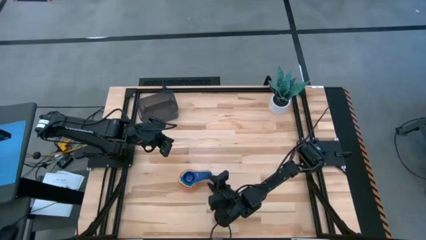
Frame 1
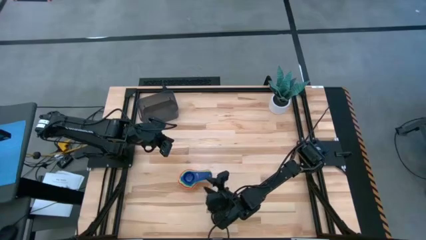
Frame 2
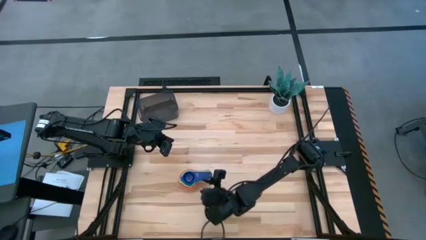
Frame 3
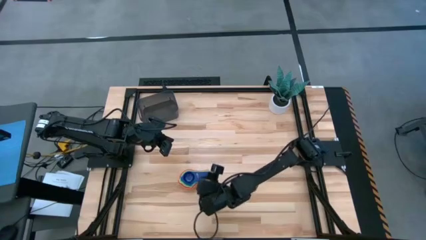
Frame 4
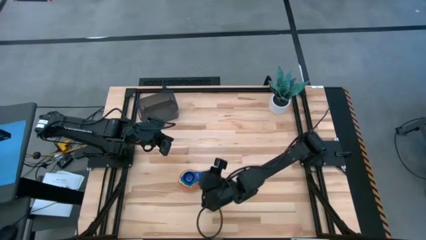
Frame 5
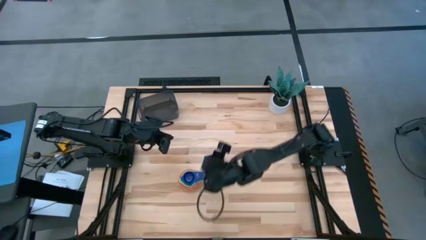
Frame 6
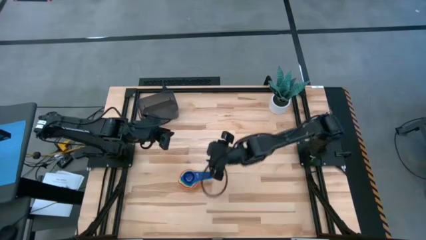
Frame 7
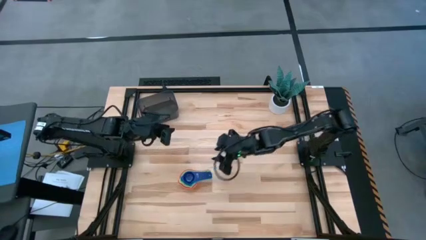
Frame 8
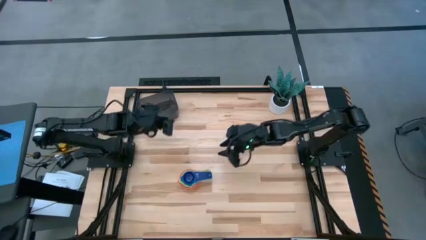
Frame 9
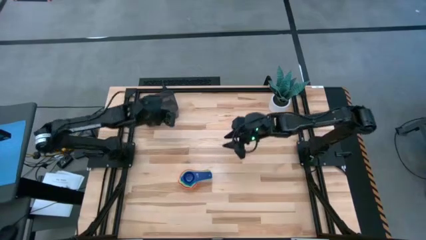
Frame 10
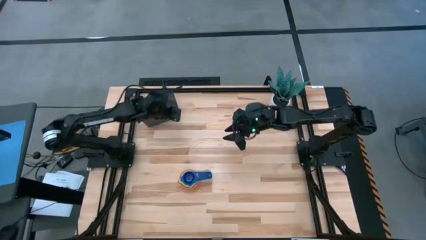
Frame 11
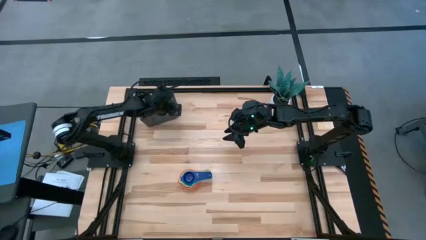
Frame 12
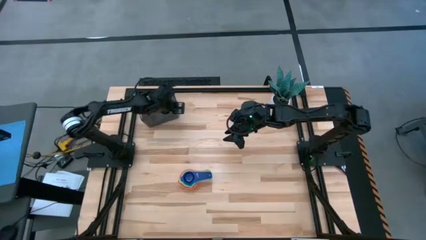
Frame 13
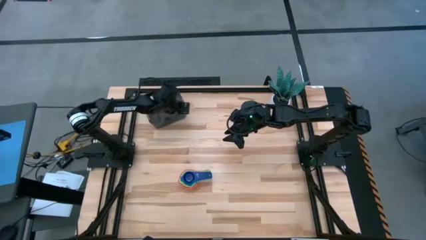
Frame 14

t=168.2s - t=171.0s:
Task: Nest measuring cups in basket
Adjust the black transparent bin on the table

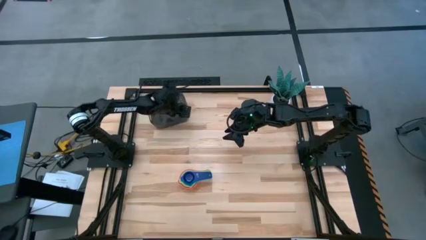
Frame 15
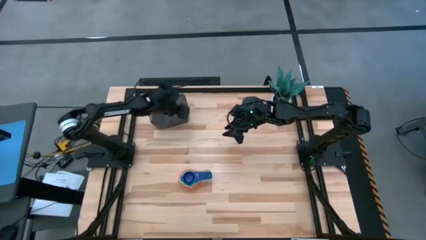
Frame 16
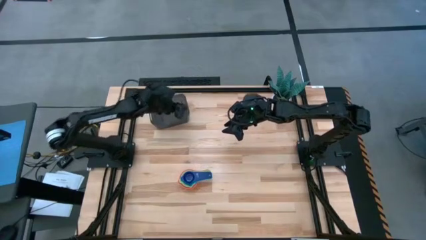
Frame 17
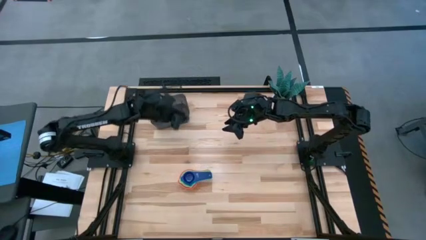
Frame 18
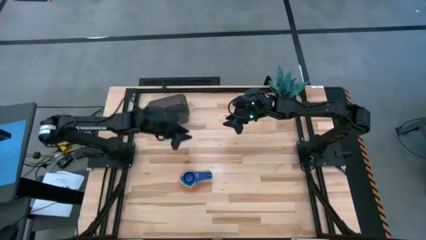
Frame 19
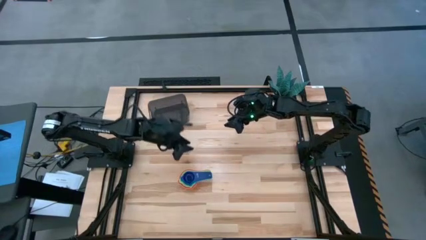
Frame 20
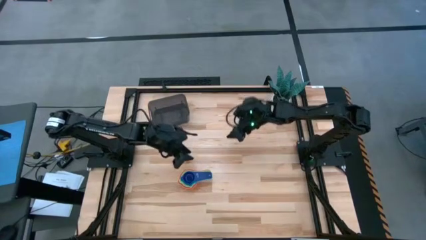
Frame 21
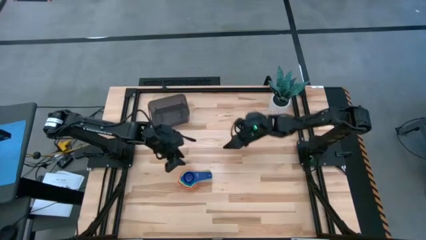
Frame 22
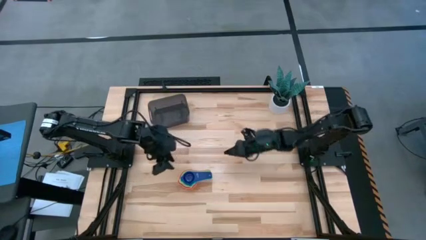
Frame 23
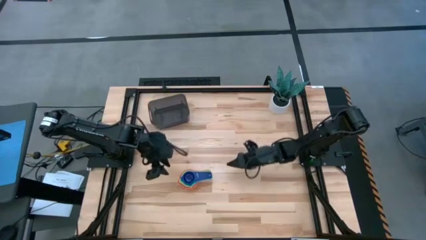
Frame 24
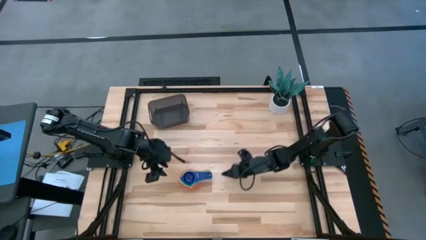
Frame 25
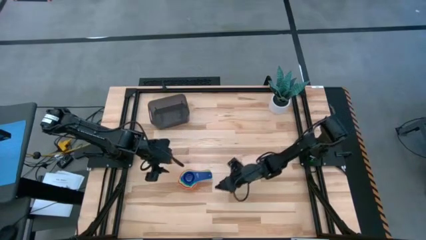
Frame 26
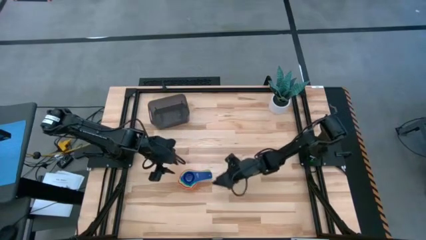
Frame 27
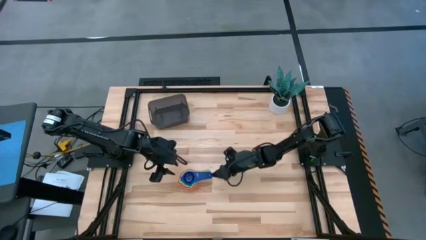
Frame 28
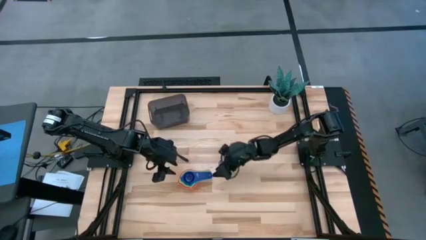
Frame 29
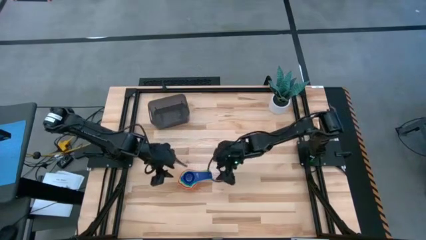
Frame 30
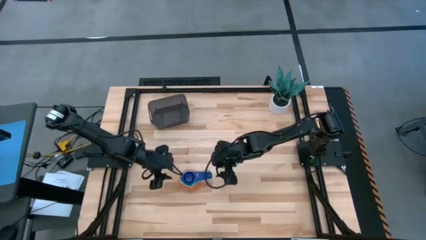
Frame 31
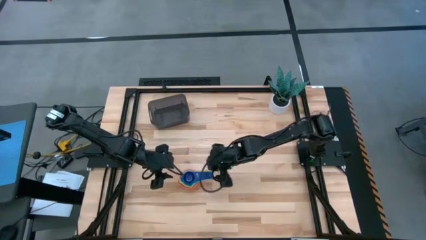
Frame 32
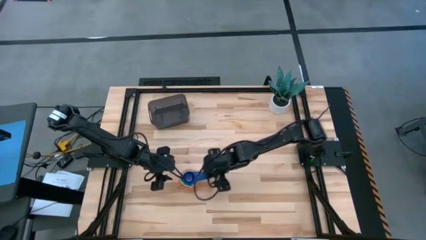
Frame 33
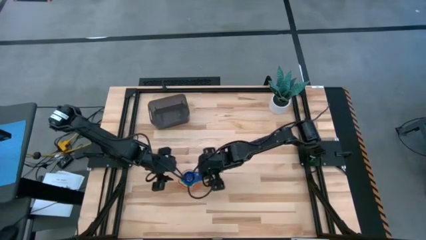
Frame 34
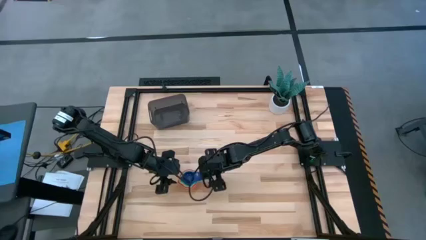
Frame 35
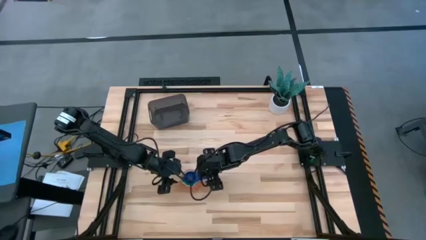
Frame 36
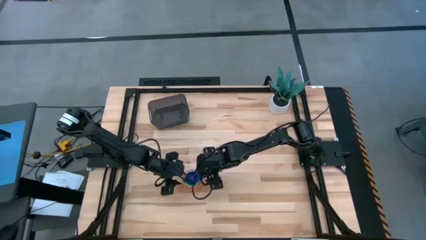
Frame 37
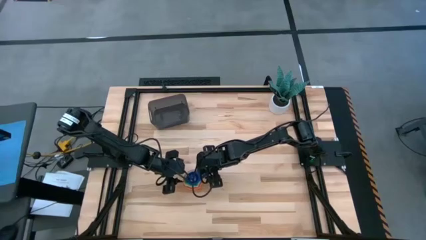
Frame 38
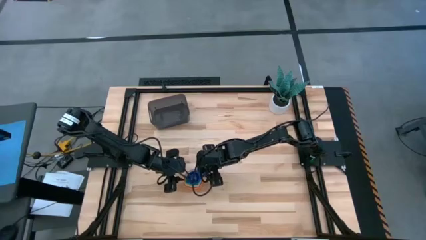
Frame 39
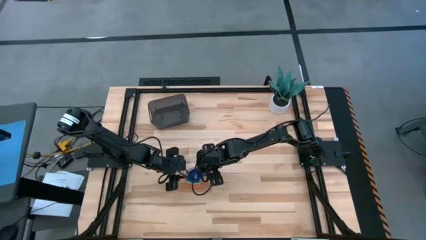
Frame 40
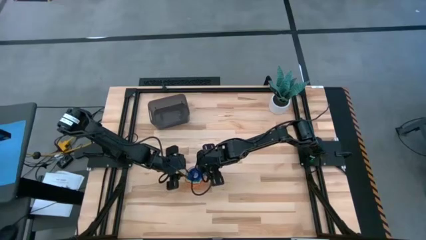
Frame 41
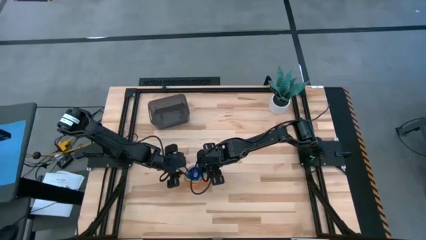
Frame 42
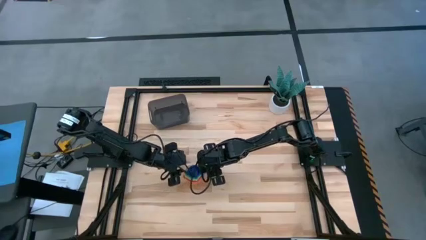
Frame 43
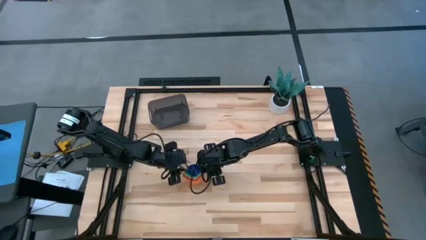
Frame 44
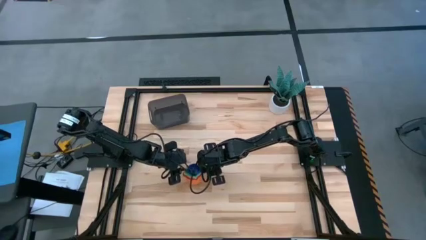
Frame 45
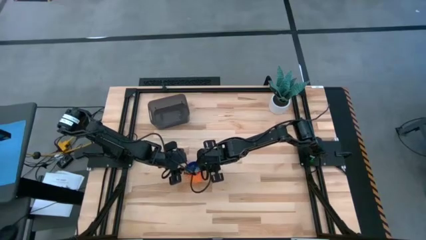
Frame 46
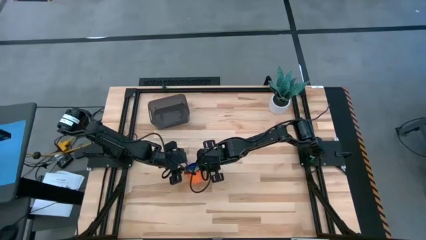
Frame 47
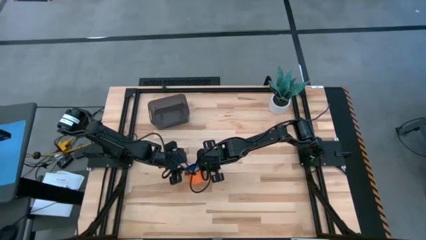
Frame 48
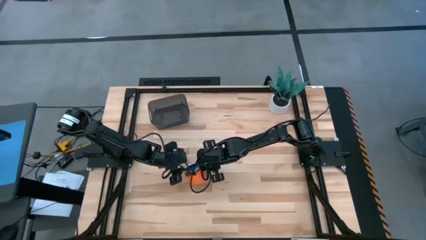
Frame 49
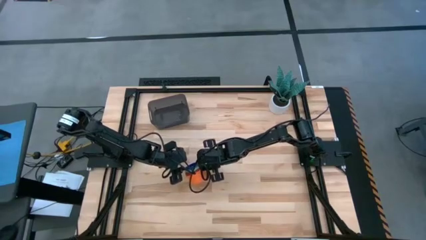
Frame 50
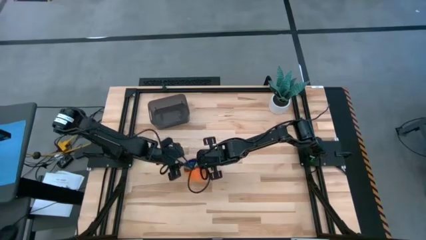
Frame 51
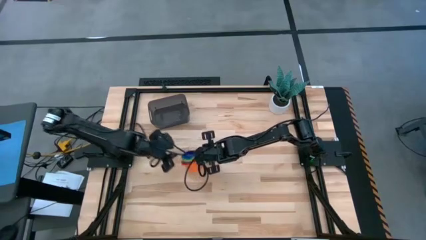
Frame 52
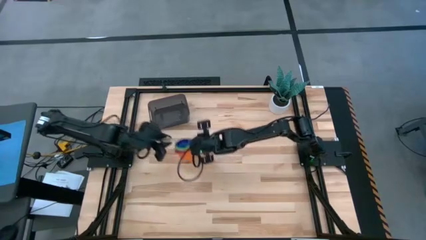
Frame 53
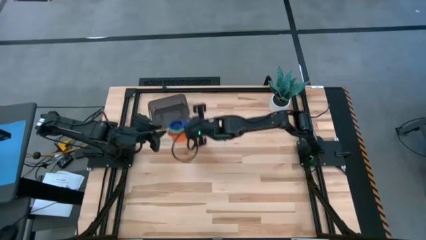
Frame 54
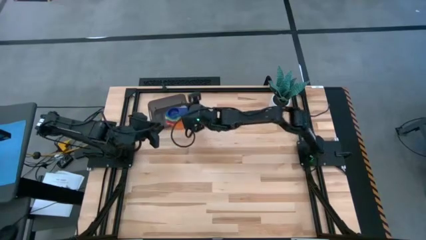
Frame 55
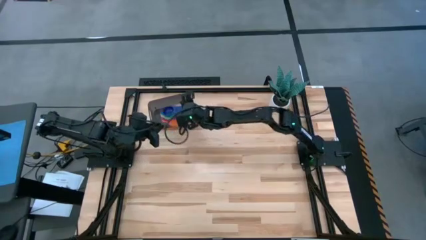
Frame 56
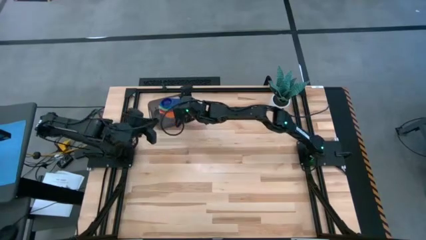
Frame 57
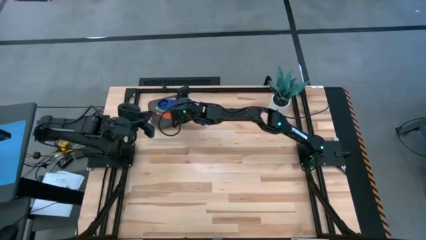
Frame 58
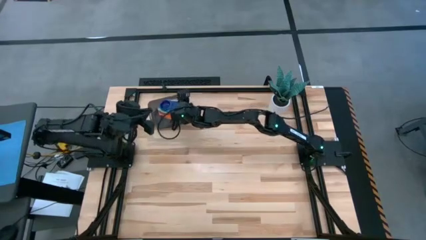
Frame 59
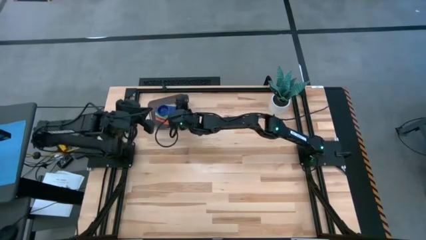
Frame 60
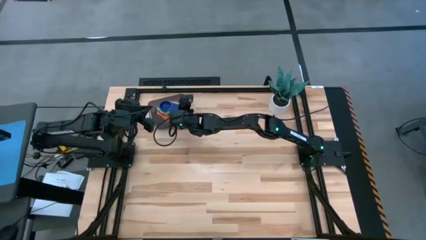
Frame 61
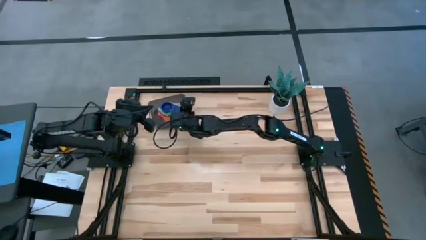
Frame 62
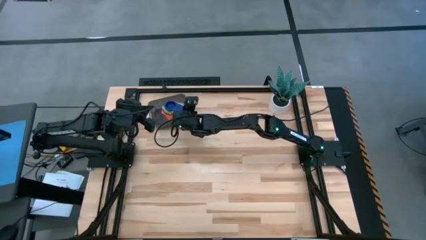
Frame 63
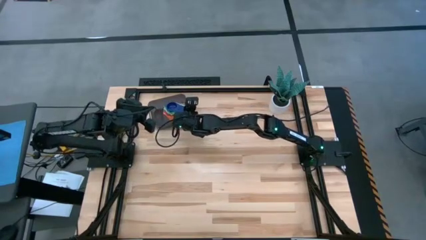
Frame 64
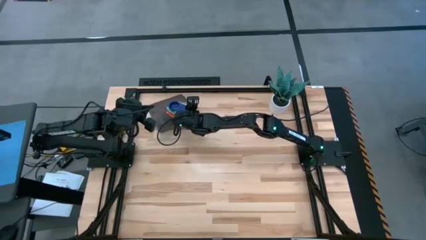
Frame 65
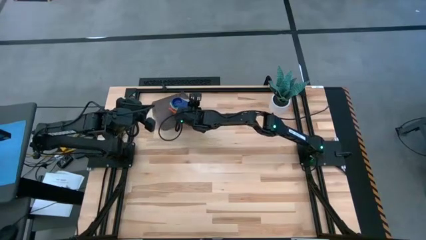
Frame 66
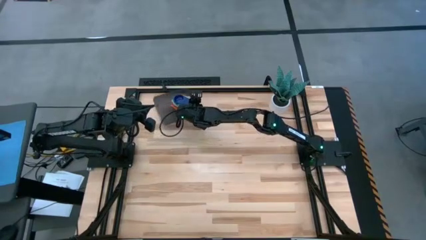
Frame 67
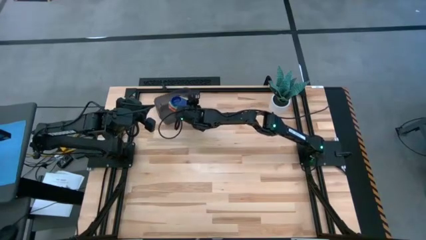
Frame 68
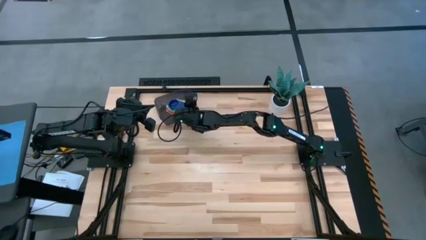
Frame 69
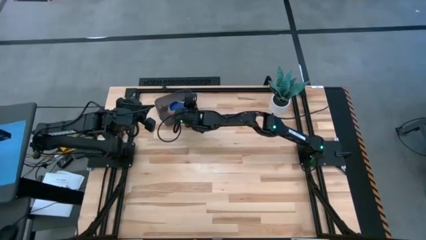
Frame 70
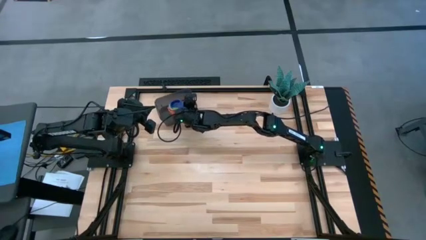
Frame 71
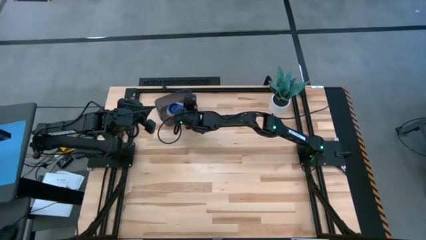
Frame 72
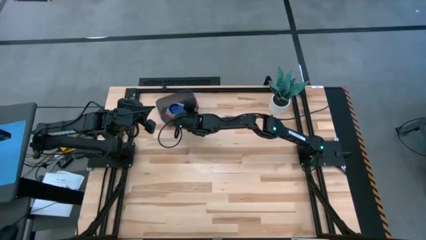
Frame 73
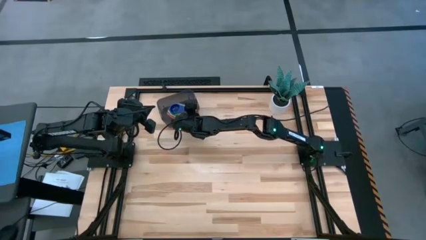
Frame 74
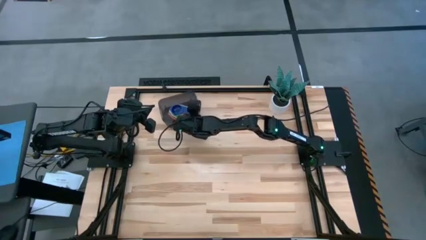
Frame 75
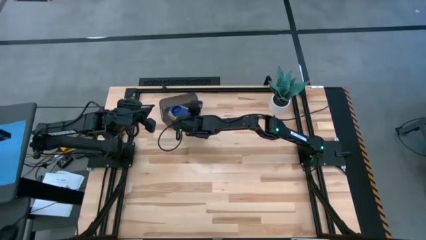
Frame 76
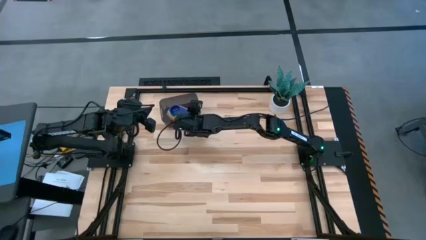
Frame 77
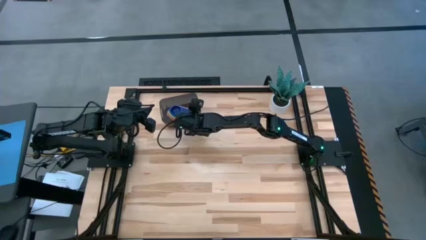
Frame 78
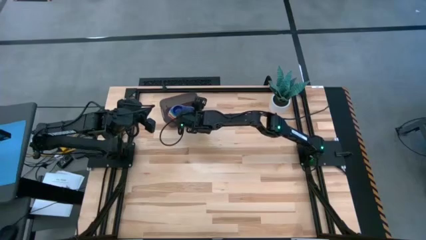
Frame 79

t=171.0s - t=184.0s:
Put the colored stacked measuring cups into the black transparent bin
